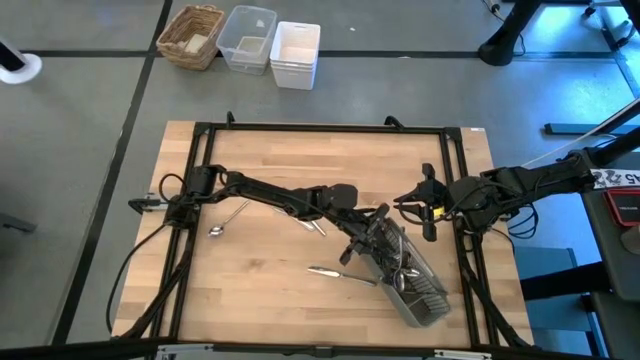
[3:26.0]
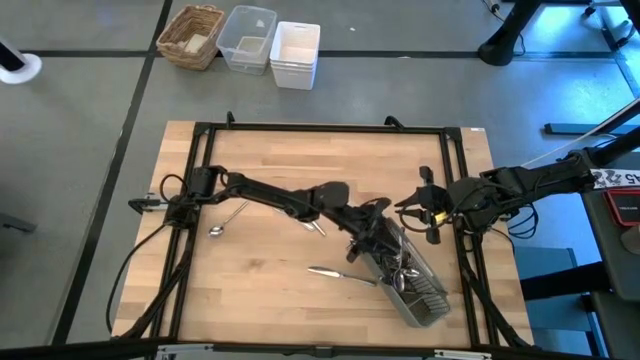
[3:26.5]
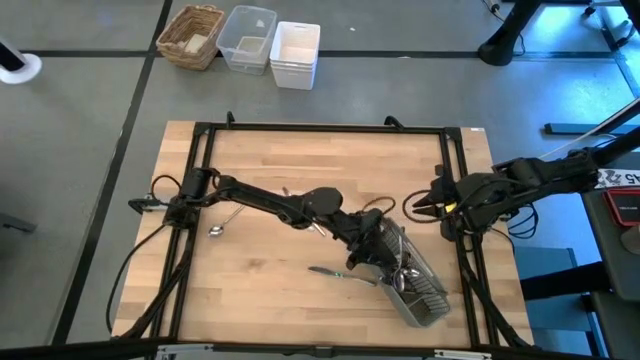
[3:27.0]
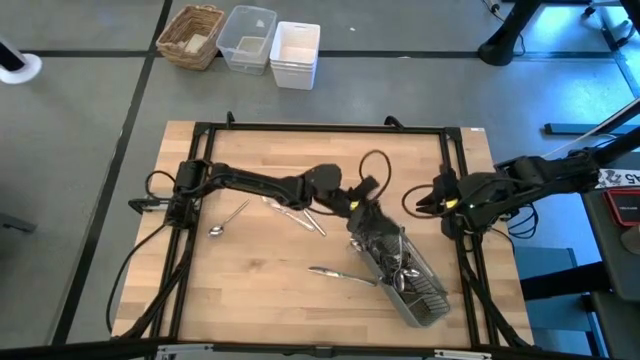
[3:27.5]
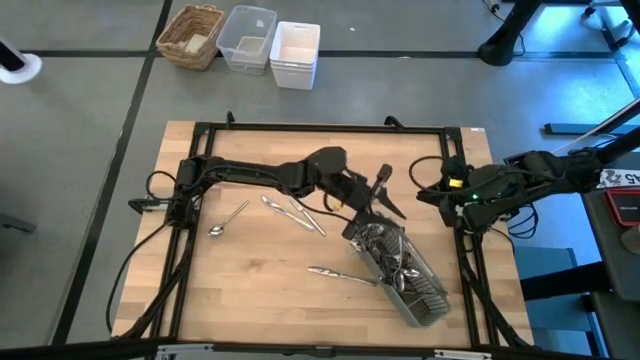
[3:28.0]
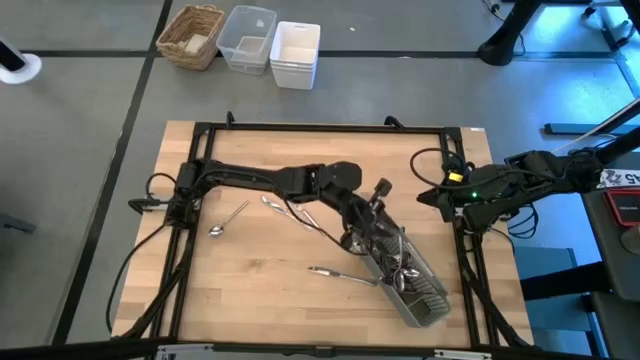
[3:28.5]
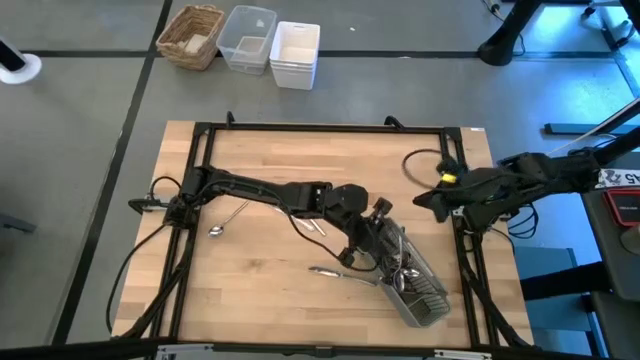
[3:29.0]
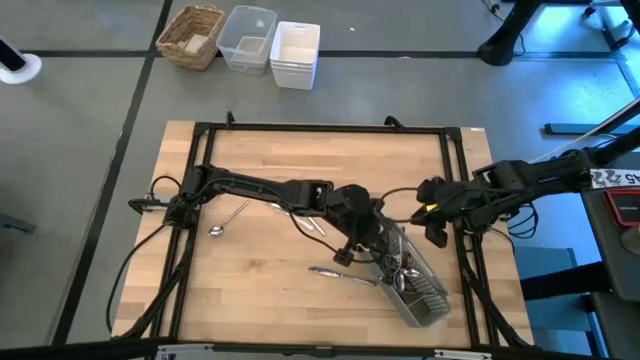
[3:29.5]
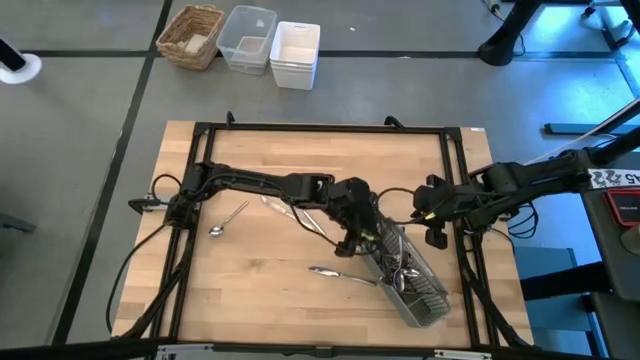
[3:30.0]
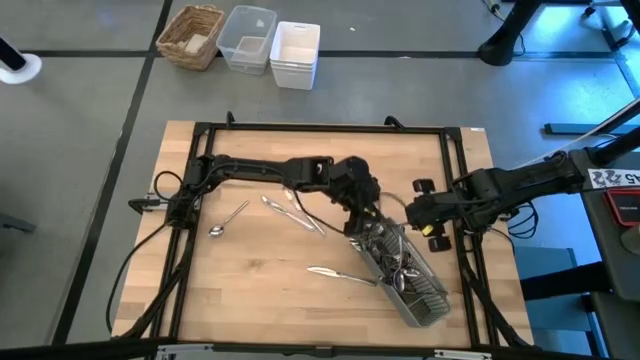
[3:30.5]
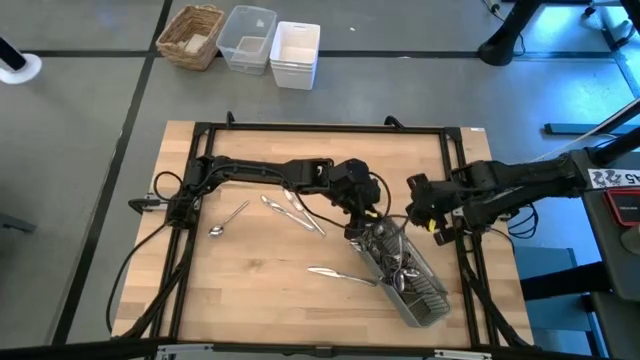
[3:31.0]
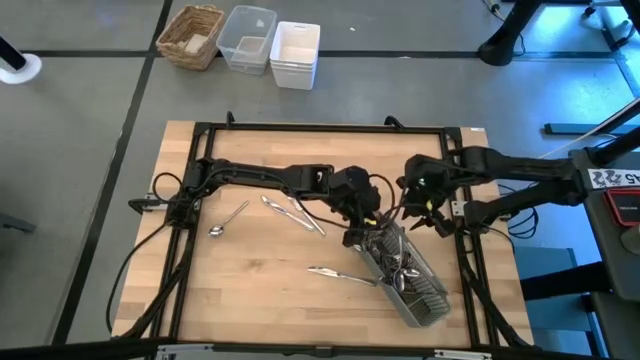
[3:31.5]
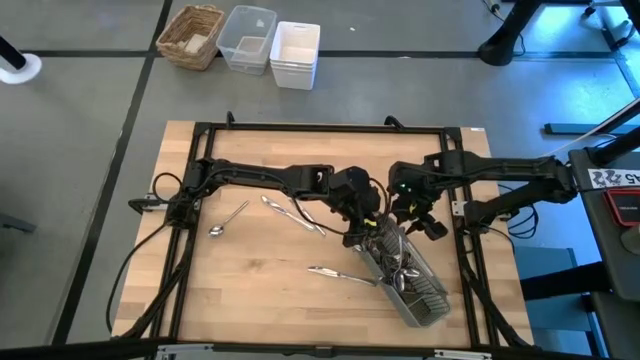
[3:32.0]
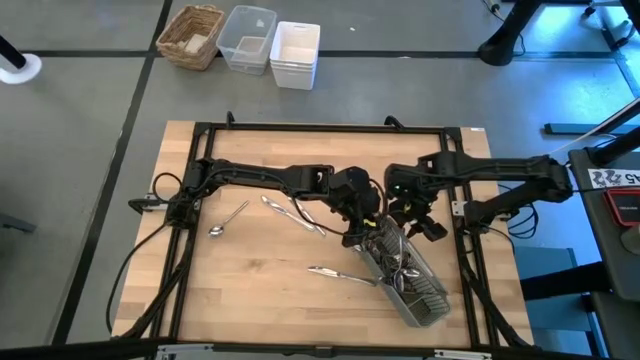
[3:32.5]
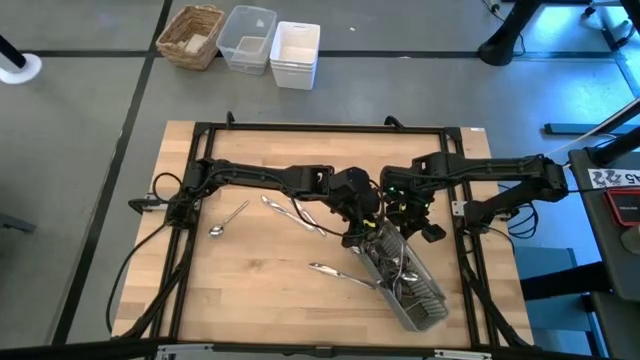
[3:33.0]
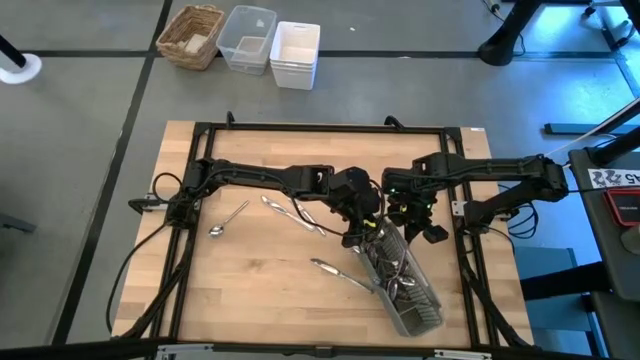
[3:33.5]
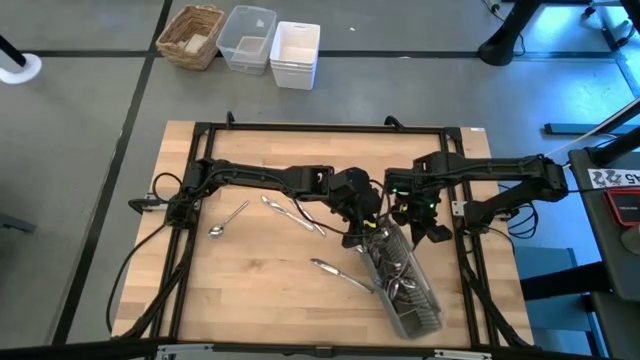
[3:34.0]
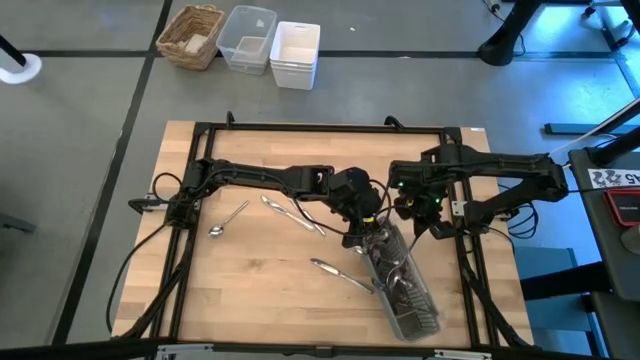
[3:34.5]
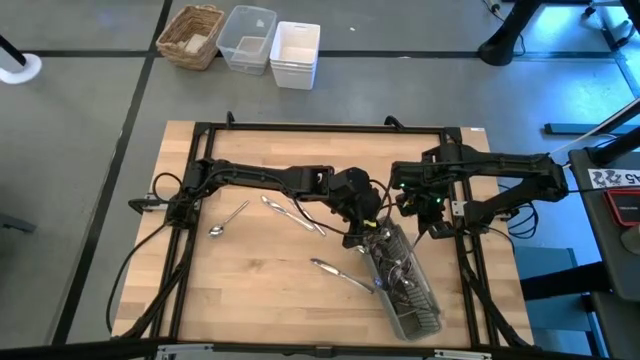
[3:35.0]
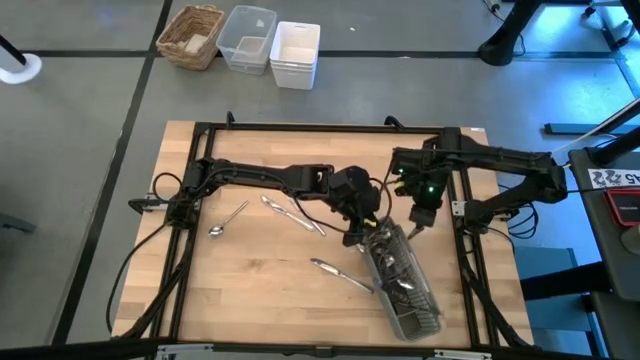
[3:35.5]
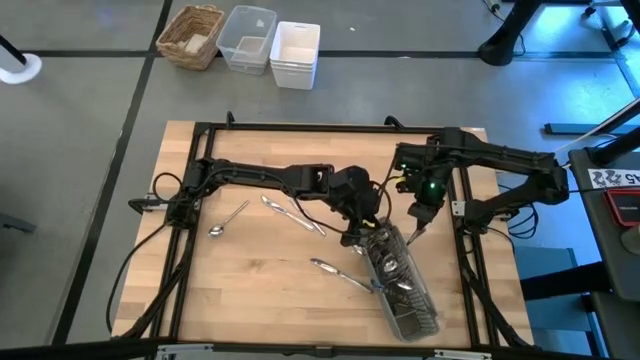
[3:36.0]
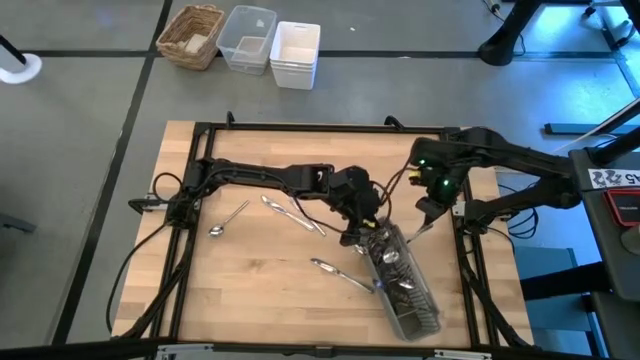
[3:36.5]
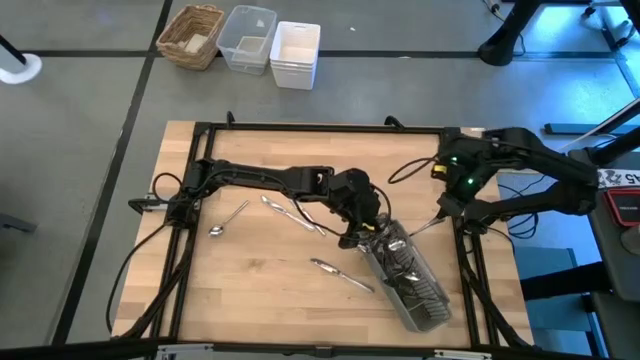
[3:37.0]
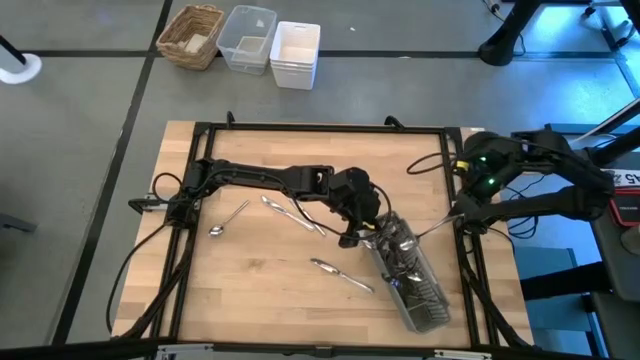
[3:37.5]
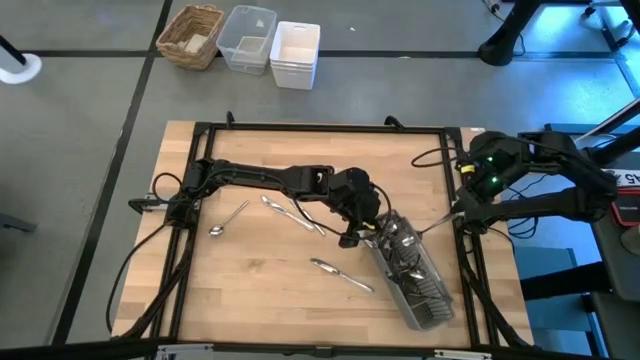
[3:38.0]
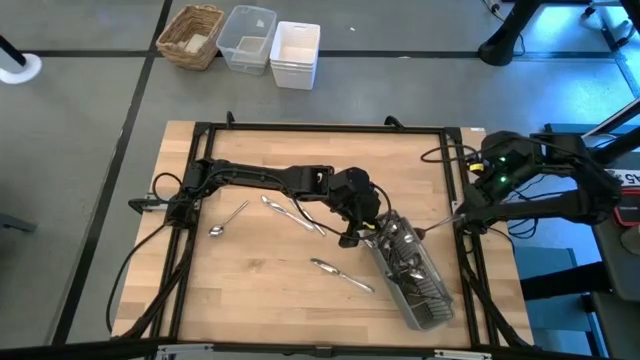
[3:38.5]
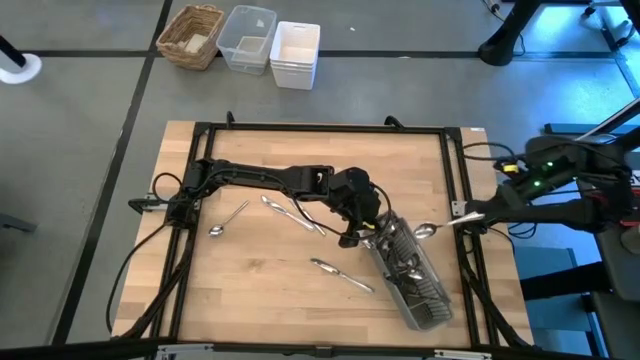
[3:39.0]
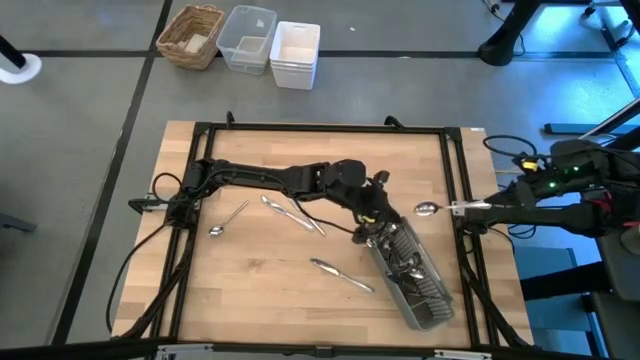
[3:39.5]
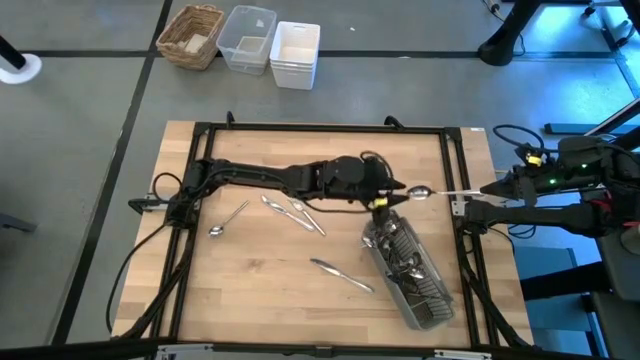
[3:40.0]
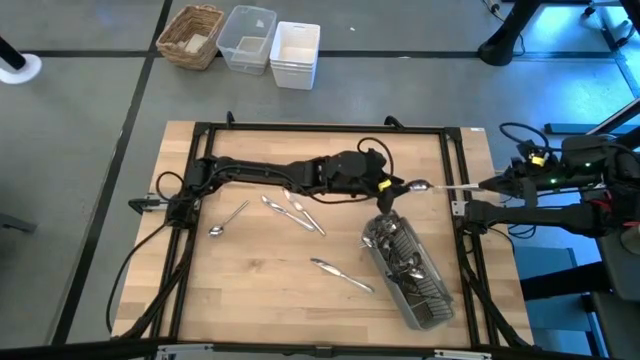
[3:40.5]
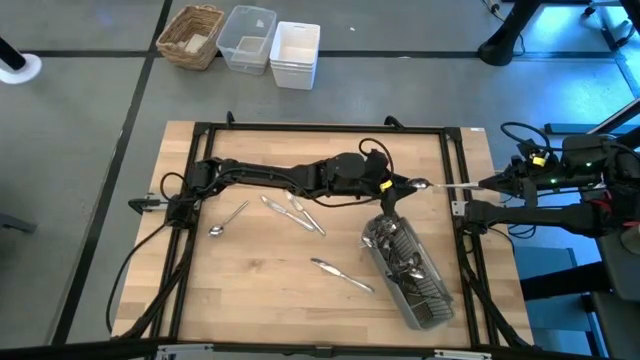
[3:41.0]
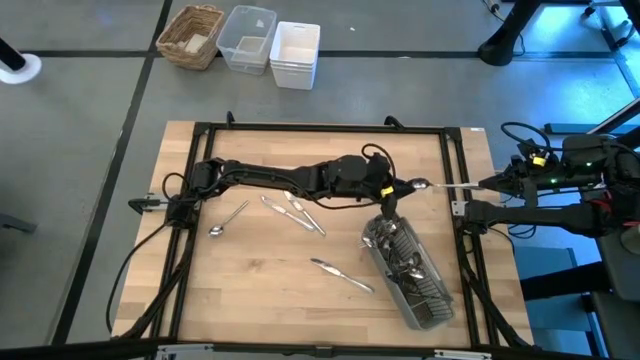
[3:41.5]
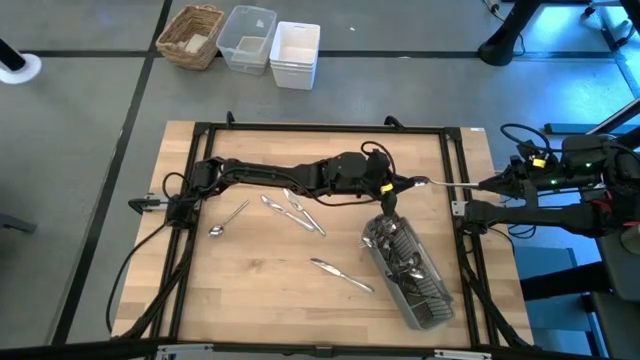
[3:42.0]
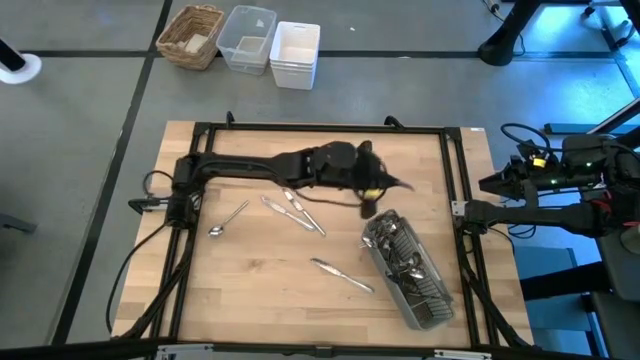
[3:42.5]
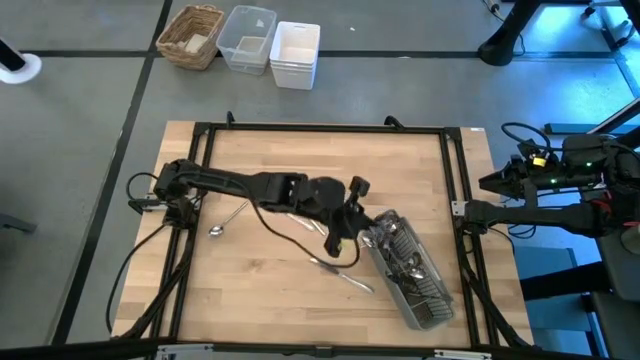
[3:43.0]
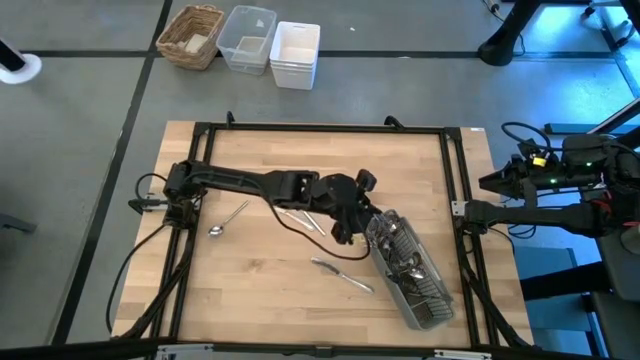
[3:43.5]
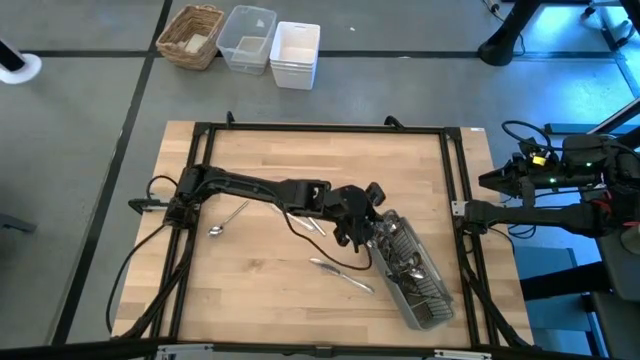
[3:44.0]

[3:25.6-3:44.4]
Task: Sort silverware
Put the silver spoon into the gray silverware basket
